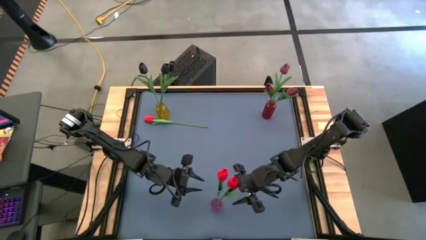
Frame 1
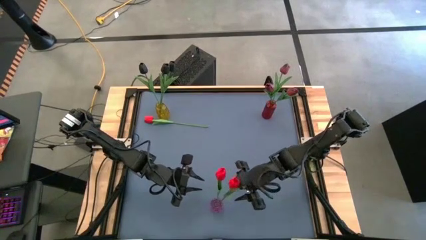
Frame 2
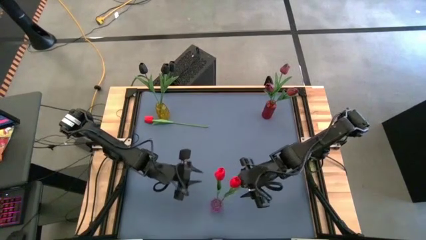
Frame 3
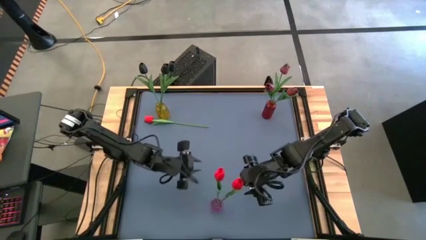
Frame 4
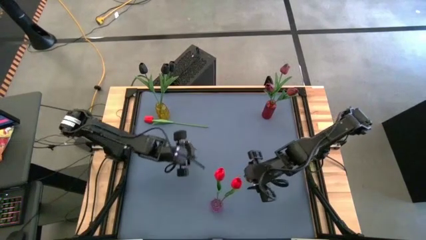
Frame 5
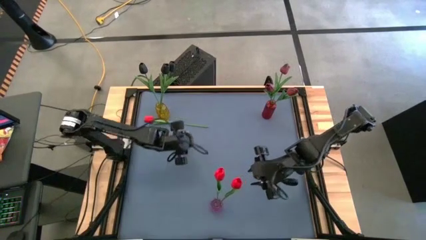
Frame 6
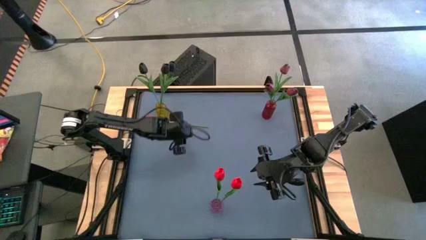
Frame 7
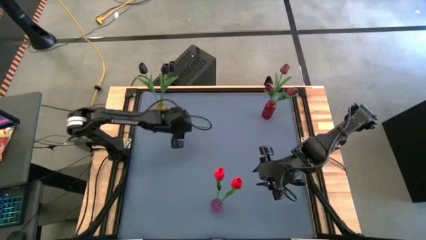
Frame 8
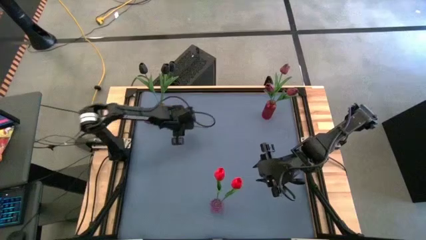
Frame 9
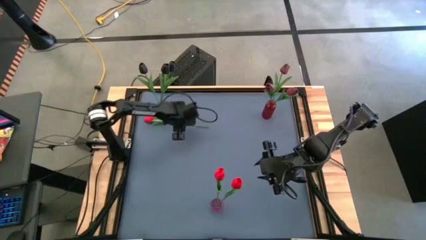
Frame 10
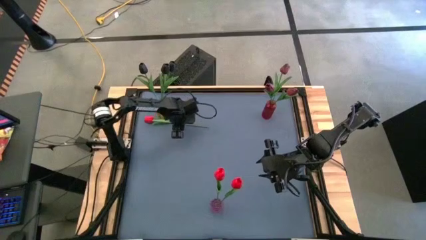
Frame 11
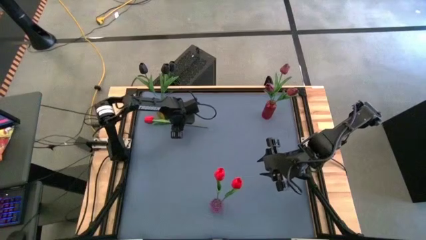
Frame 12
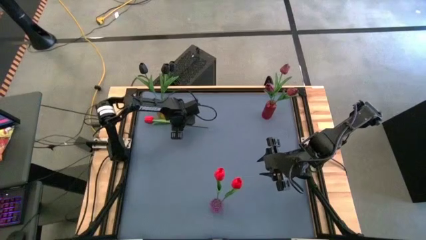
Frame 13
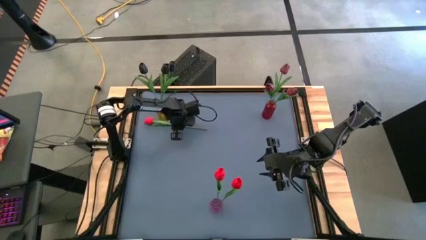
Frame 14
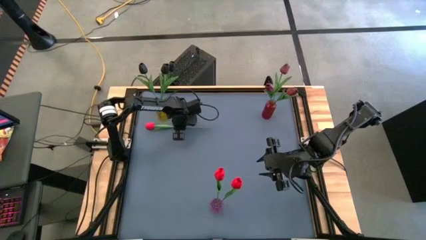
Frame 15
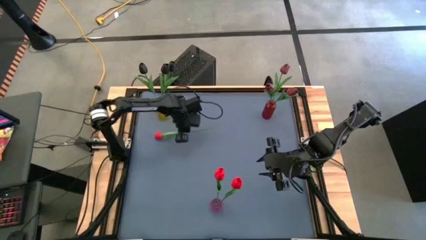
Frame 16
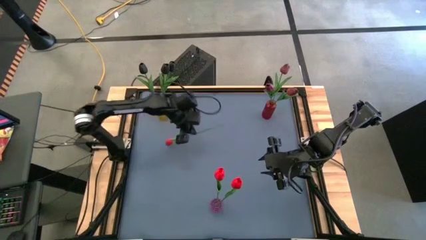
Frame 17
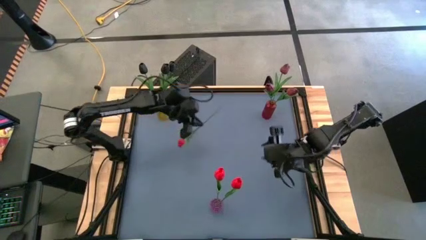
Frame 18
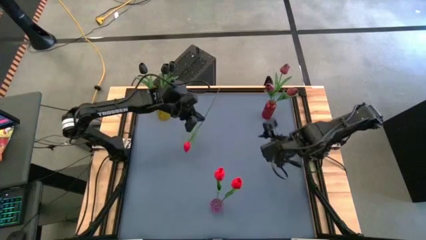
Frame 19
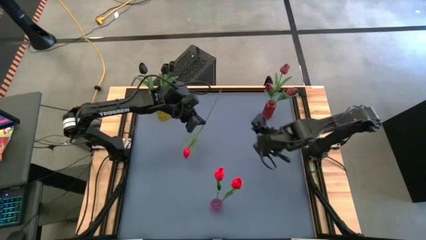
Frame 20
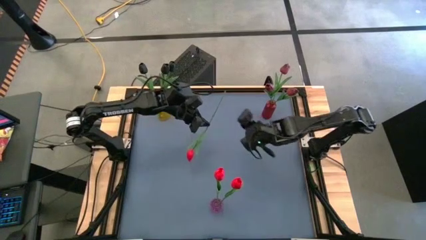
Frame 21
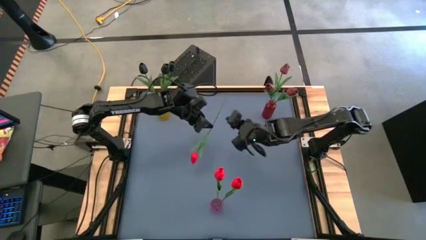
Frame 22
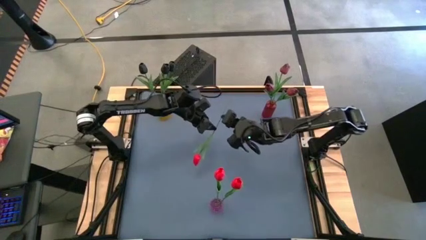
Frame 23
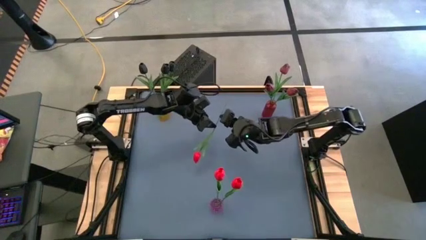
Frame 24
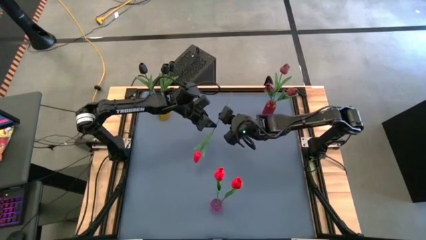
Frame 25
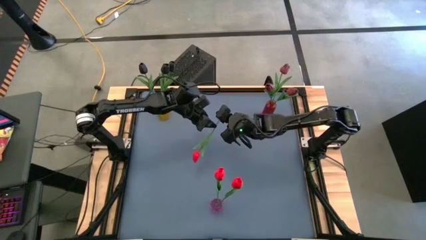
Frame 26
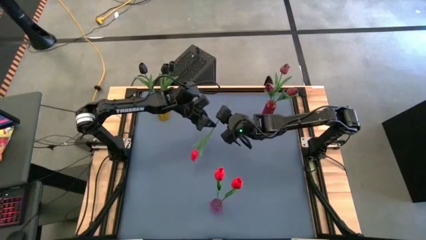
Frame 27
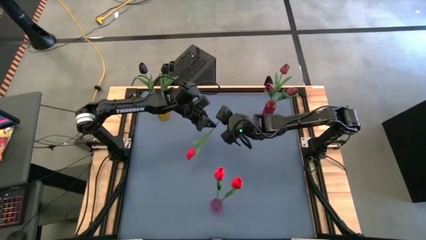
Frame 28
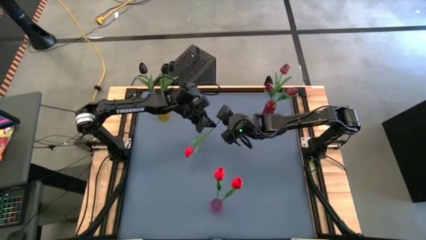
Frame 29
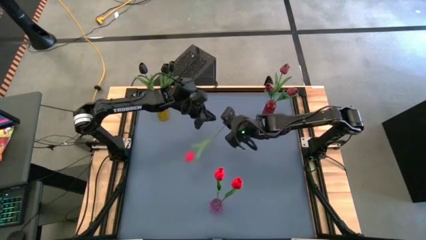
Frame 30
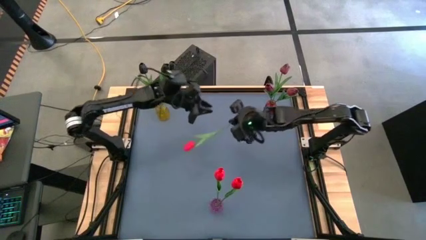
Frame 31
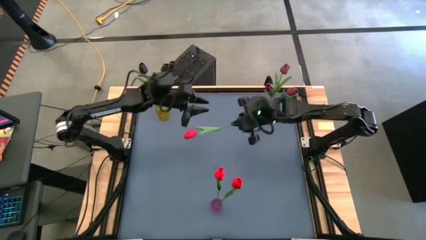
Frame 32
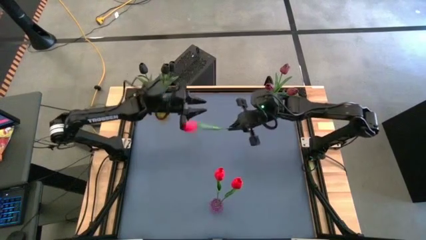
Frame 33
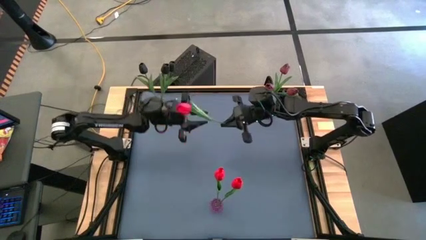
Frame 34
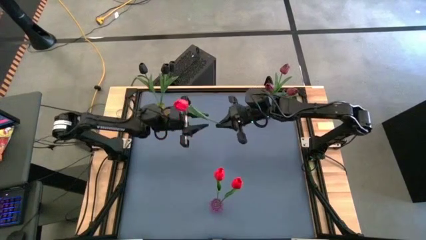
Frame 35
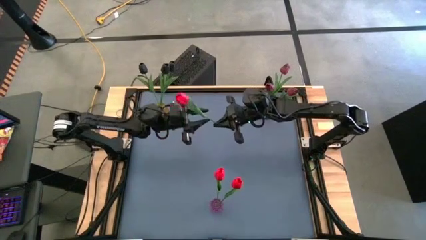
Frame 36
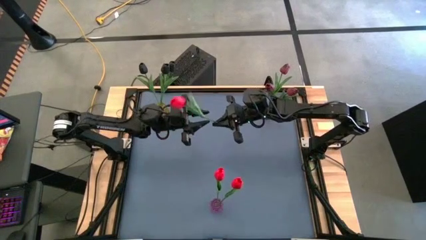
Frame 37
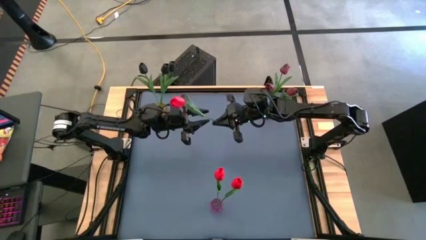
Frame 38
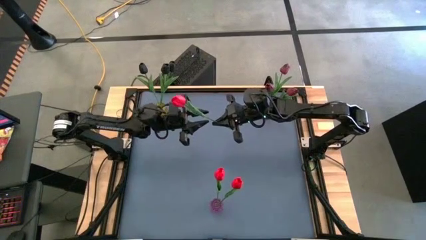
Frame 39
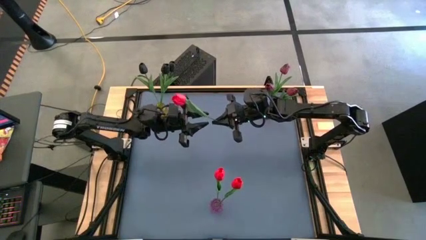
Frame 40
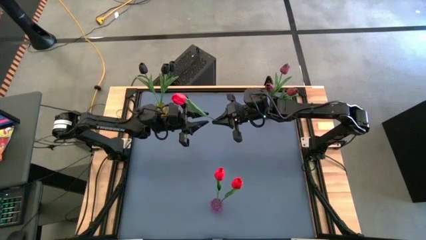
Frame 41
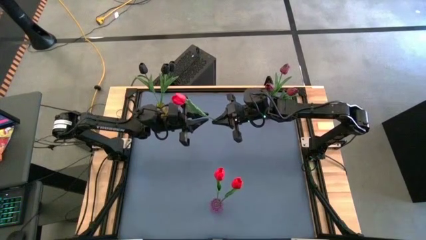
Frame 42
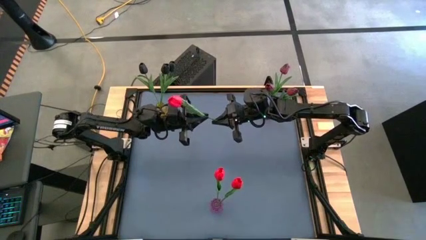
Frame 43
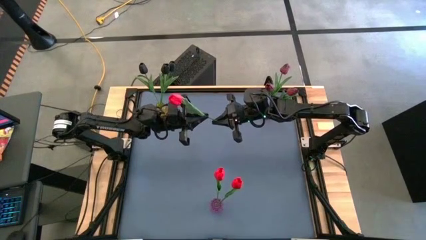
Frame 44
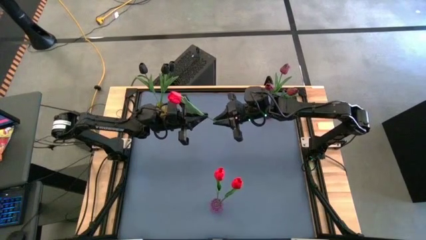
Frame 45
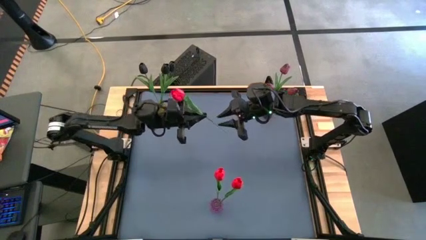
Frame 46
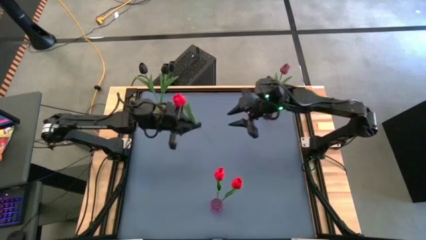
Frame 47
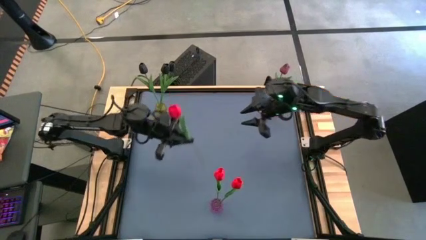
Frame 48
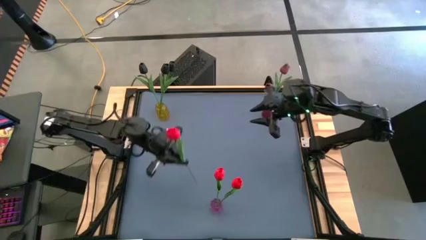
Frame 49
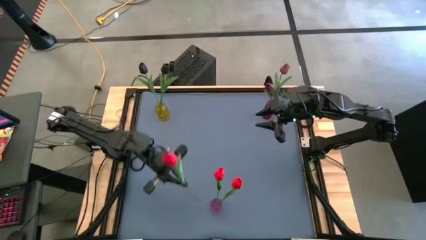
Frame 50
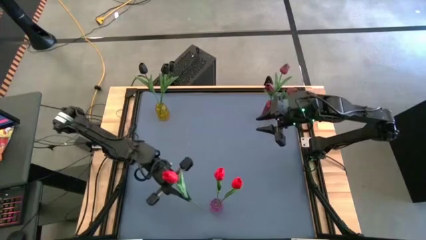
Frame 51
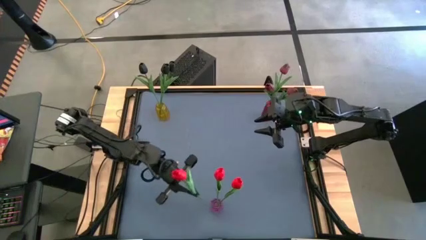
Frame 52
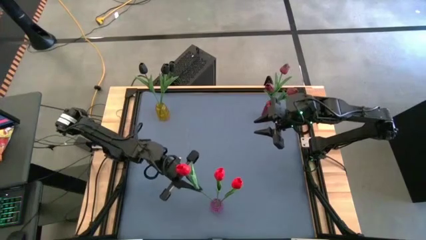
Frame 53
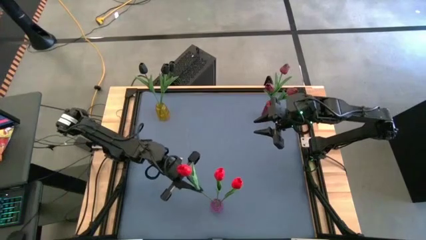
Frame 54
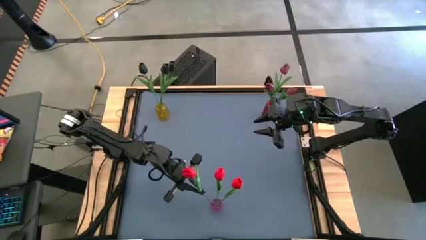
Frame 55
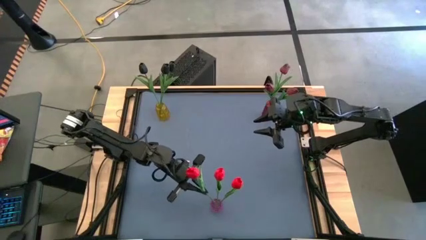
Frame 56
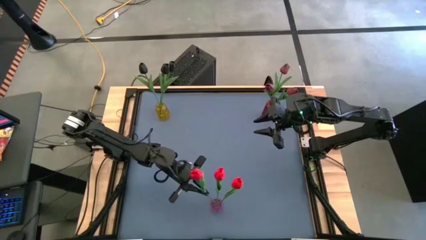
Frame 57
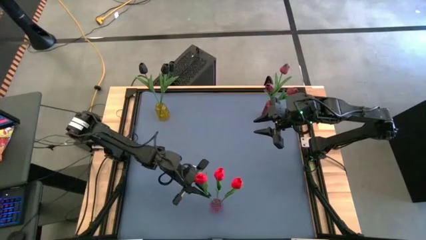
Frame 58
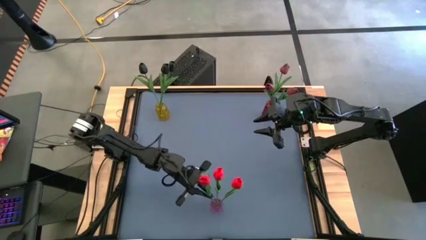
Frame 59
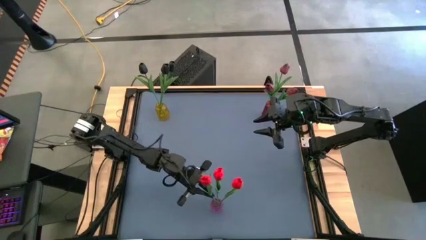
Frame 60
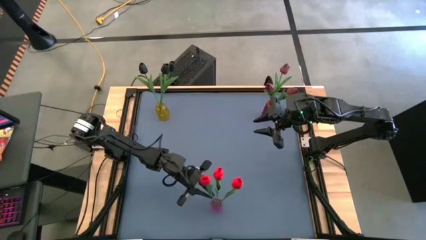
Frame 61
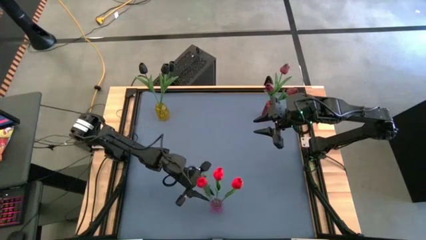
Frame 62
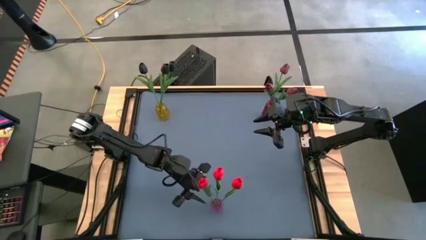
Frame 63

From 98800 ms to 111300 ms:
Task: Sort flowers into vase by color
Put the red flower into the violet vase

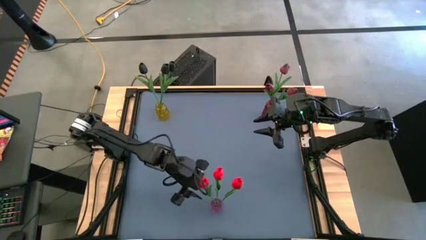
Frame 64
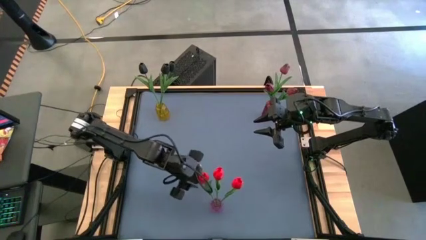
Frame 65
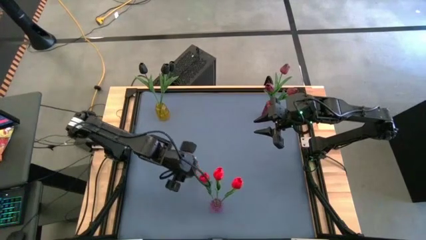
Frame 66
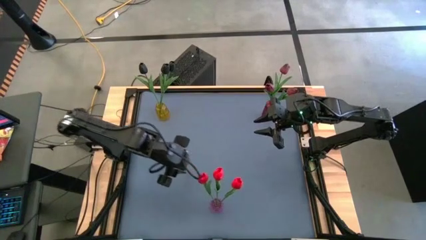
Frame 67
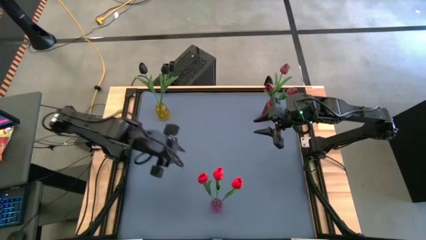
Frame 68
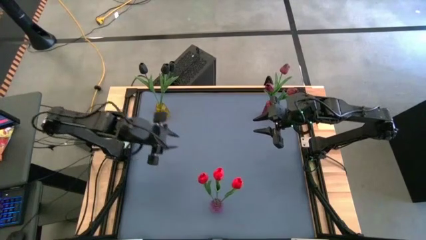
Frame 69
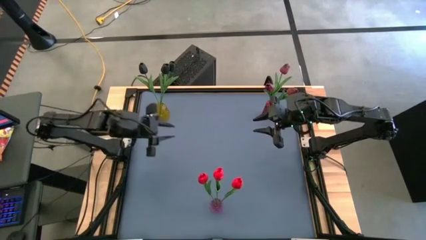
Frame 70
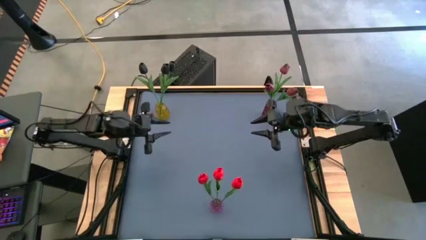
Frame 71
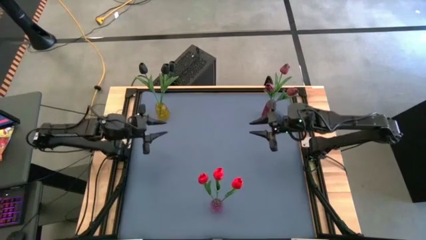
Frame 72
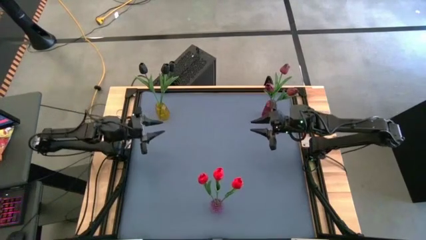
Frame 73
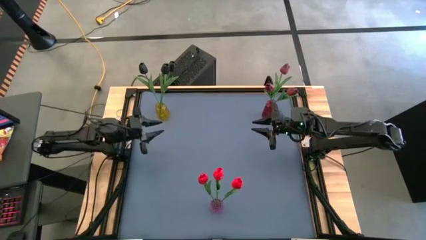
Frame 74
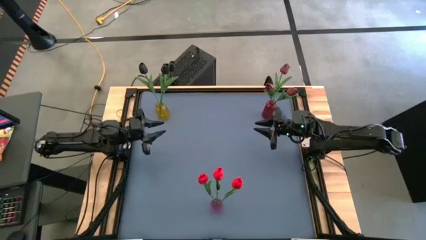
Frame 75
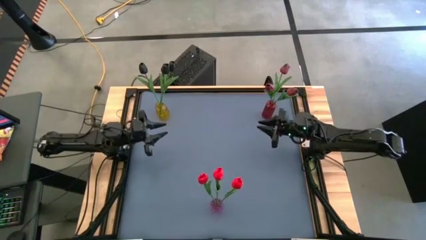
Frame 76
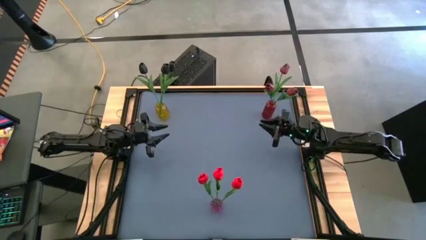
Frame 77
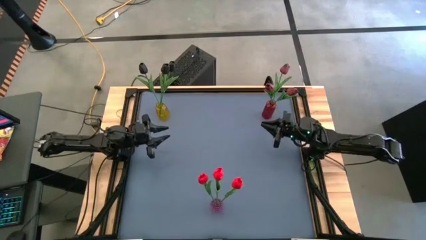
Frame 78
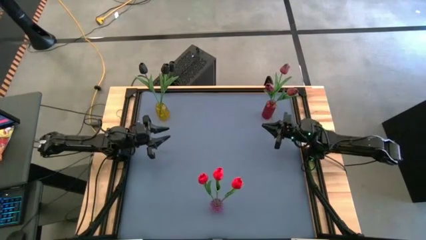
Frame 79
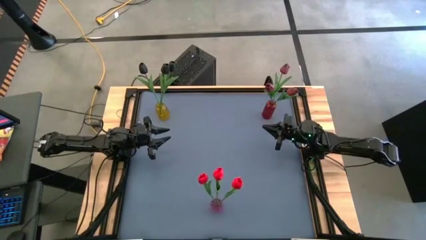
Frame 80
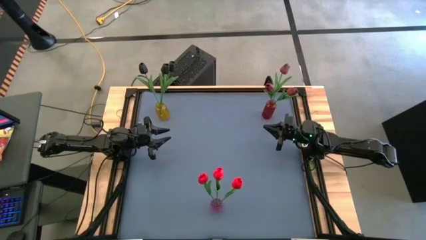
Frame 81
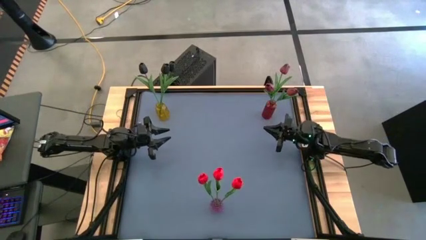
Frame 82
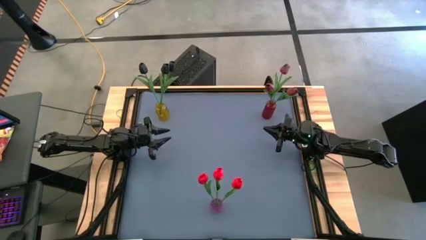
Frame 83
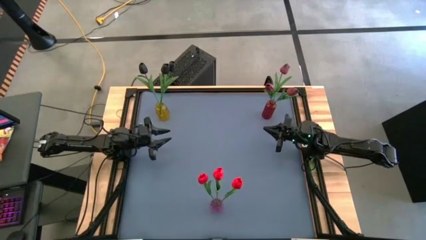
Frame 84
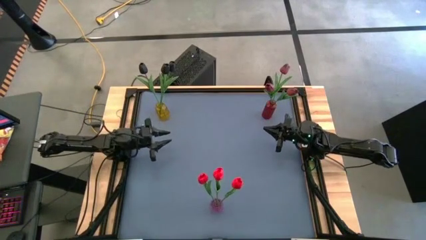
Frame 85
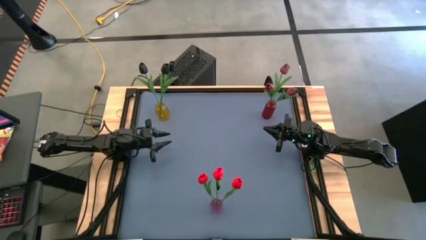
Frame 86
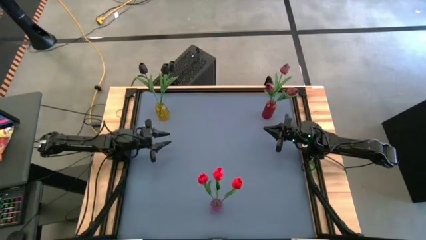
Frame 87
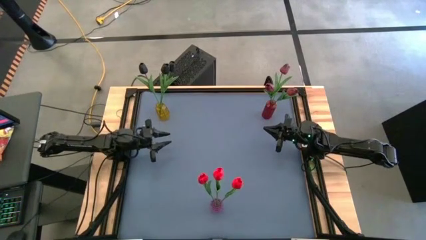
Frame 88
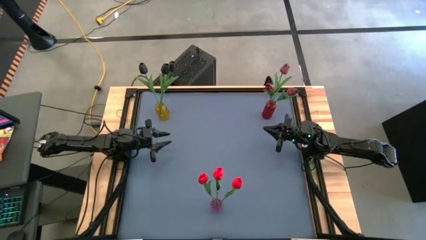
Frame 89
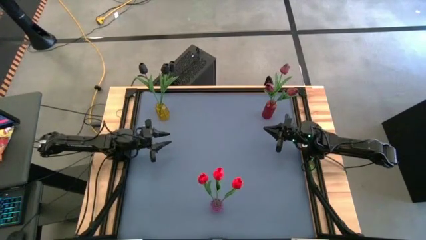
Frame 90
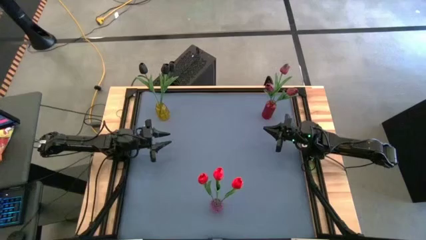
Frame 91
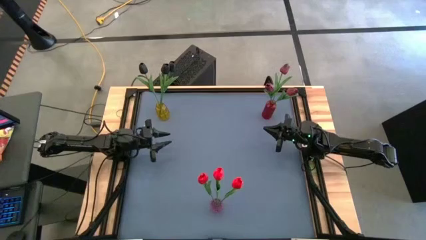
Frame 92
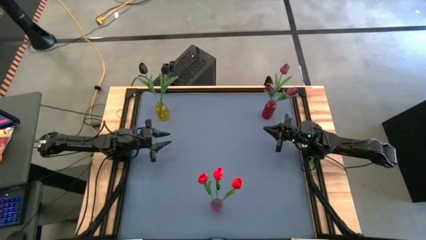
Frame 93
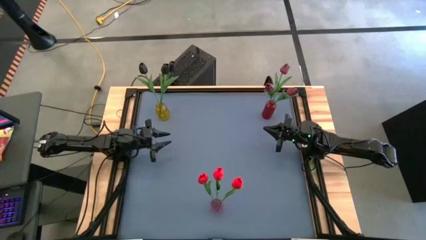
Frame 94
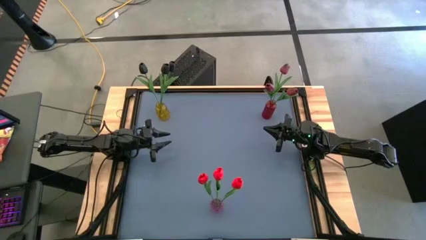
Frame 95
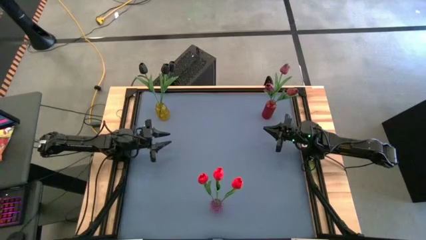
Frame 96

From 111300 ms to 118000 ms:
Return to Home Position
